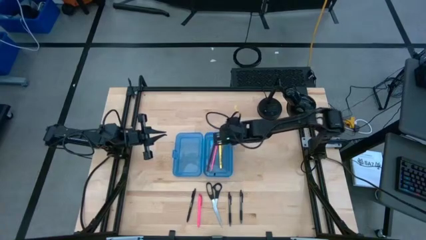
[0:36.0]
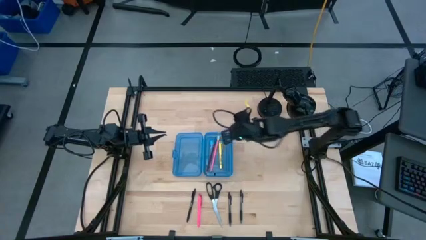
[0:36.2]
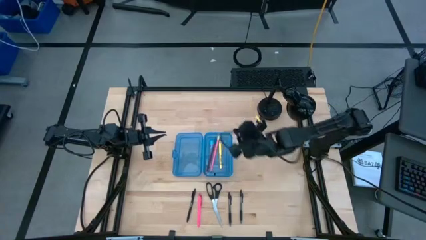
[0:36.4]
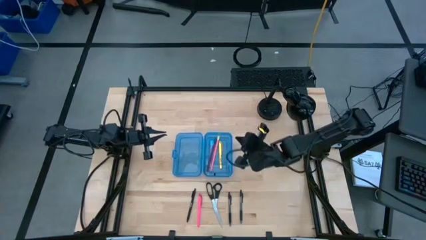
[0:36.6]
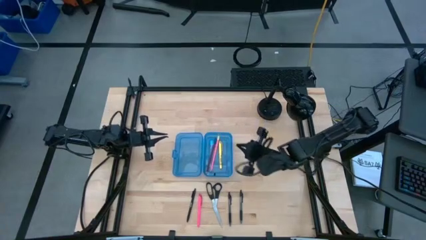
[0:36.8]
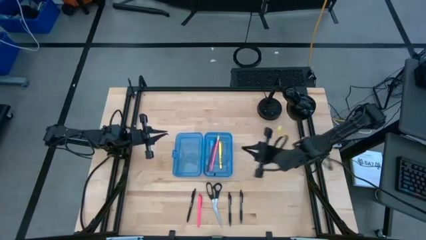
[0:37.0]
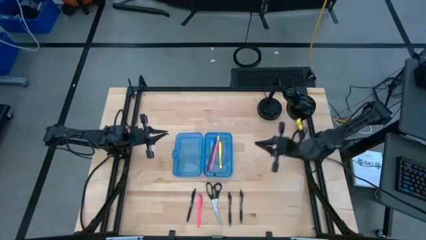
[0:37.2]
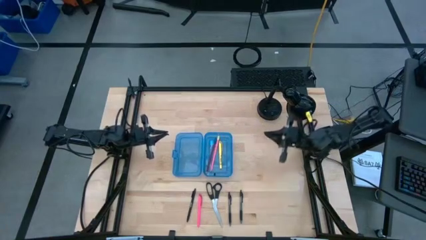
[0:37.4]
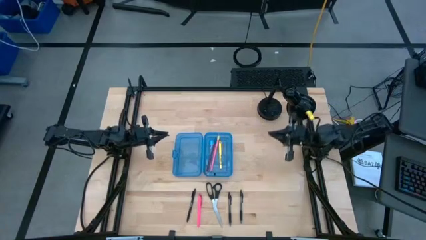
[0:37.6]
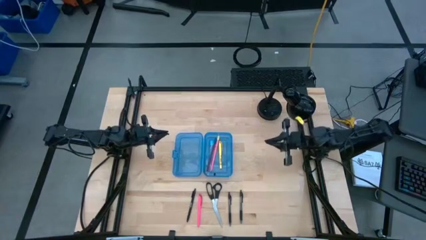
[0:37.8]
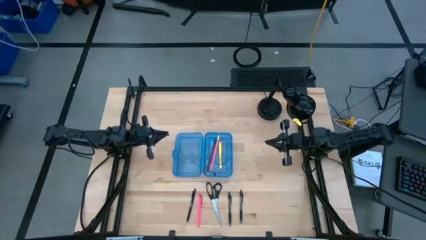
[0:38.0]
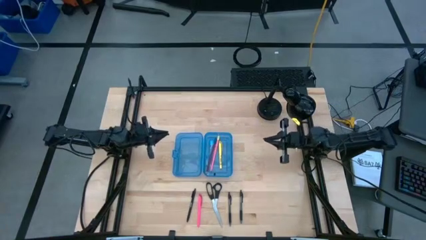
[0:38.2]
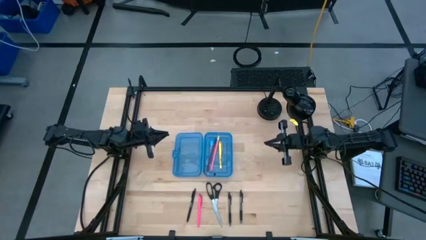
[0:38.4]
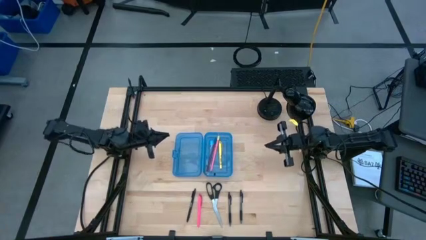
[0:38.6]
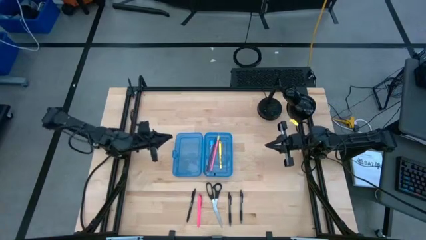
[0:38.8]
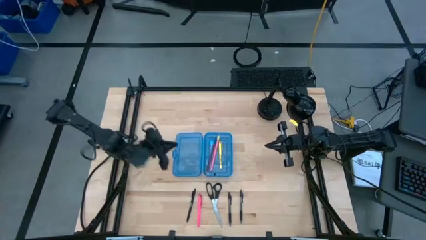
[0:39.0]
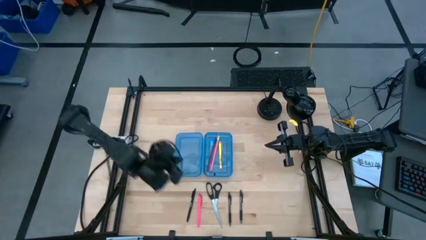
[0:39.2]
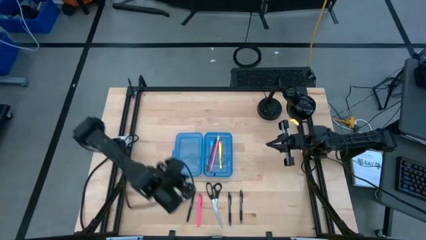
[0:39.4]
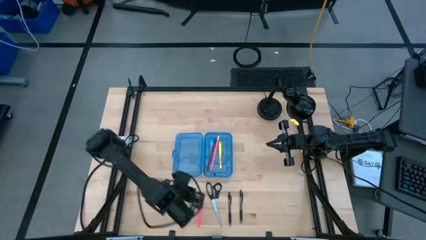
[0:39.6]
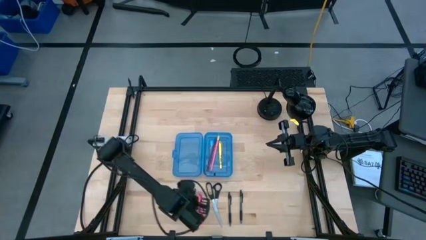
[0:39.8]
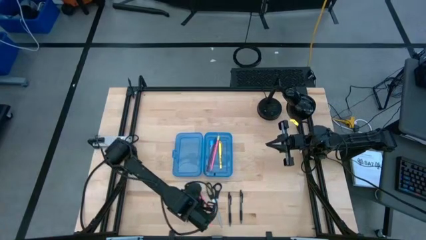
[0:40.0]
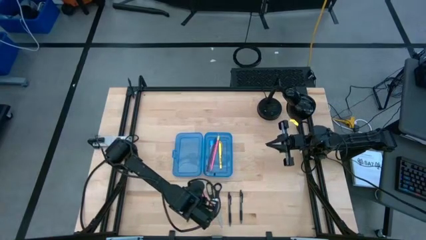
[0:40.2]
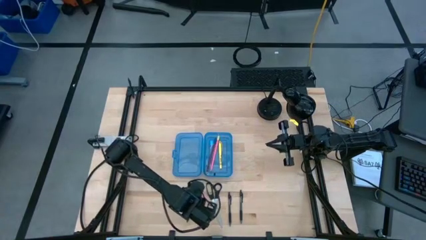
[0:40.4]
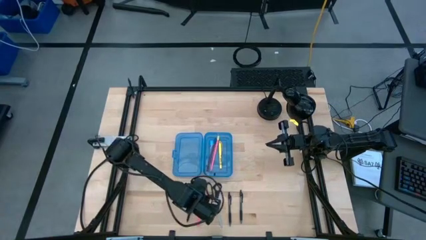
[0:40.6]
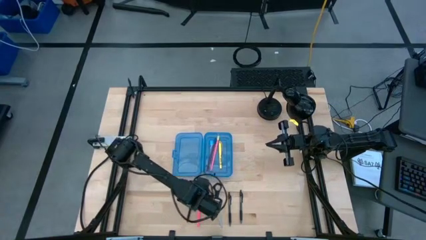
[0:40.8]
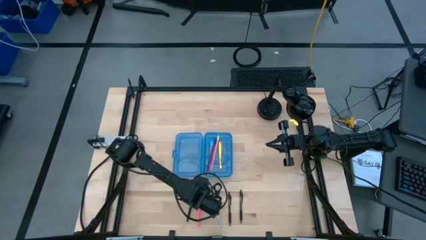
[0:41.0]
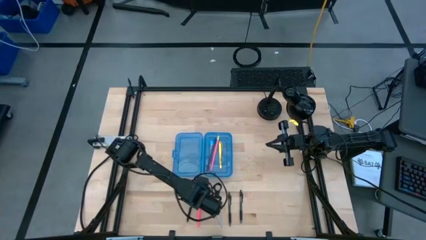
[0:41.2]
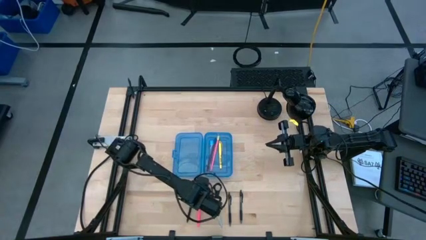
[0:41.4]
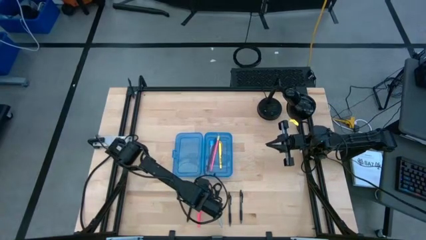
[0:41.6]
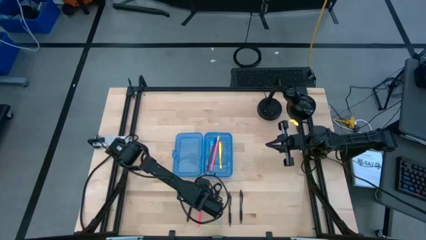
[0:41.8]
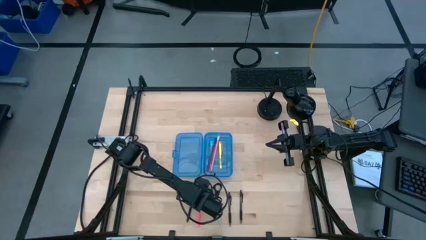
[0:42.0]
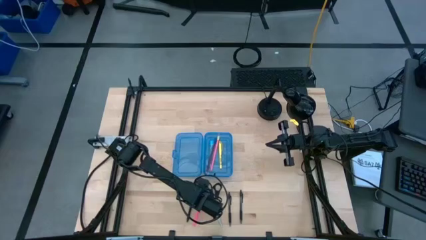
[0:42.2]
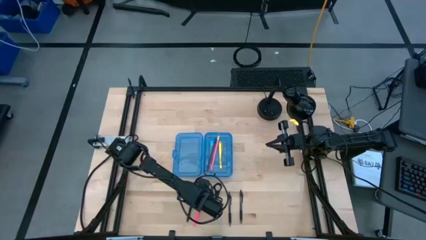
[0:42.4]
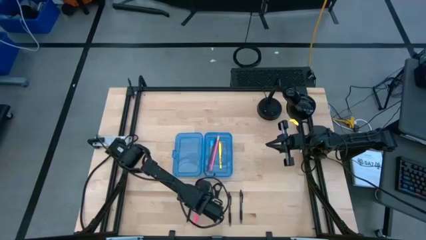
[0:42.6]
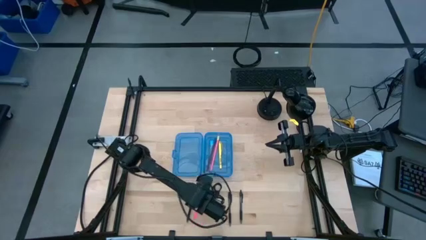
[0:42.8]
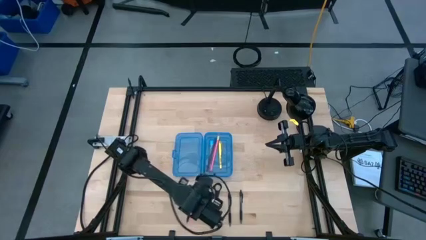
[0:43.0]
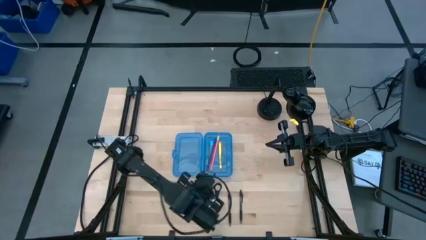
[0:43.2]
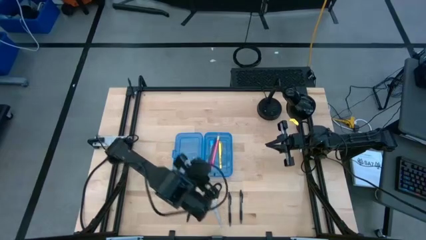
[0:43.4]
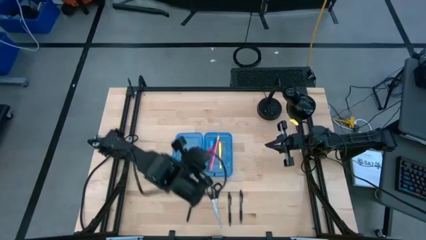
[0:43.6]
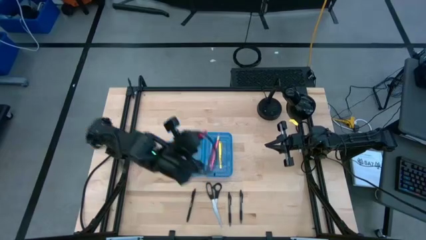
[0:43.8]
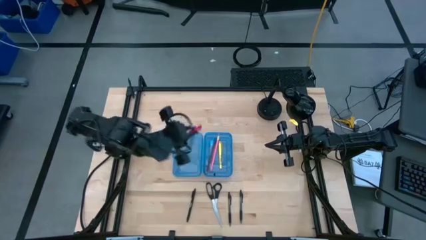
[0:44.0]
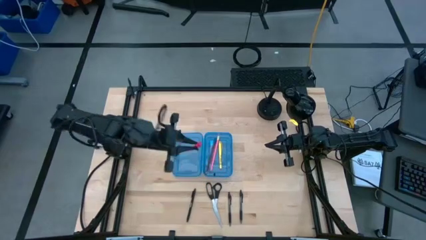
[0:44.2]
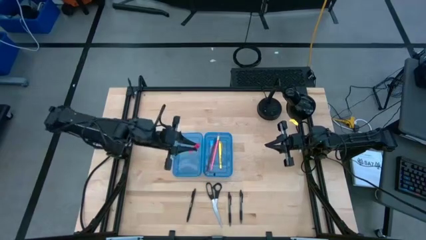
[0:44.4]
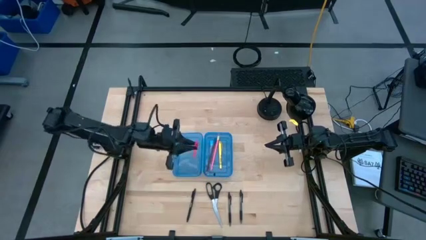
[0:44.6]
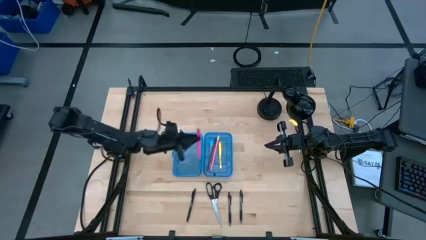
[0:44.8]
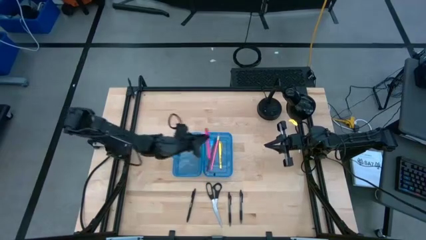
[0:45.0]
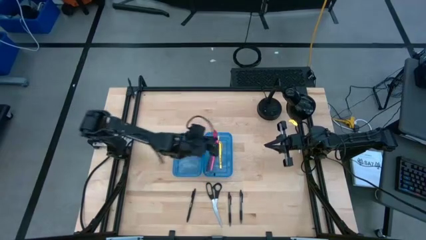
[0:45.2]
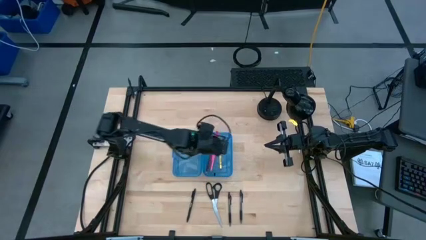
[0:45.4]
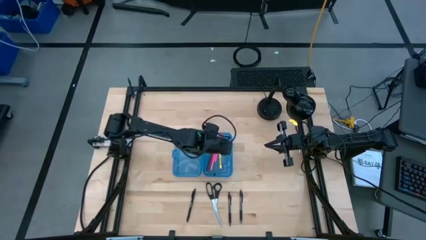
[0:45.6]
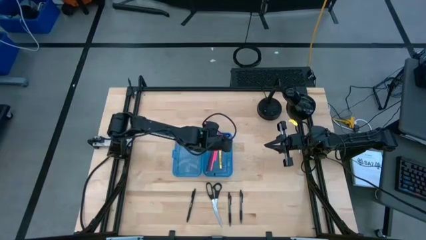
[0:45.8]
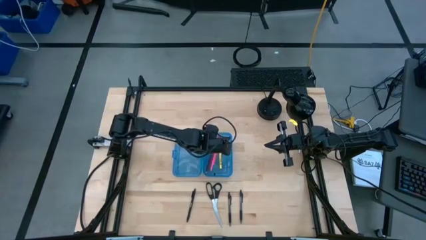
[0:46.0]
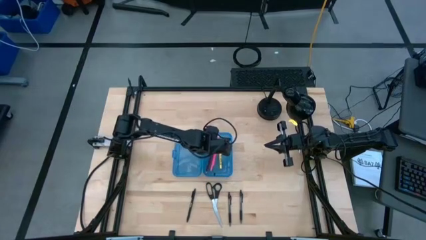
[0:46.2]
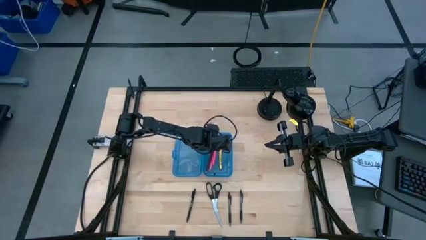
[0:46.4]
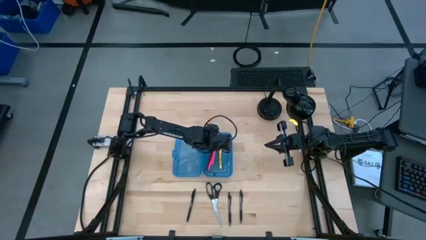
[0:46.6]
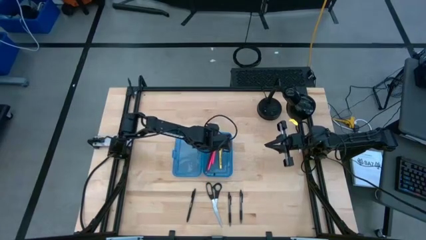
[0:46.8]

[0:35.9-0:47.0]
Task: Pick & place school supplies into a supply box
Put the pink pen into the blue pencil box

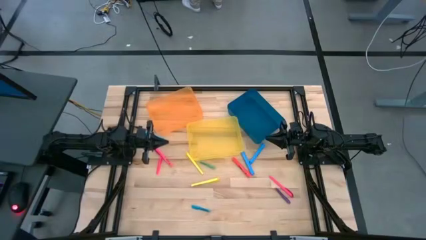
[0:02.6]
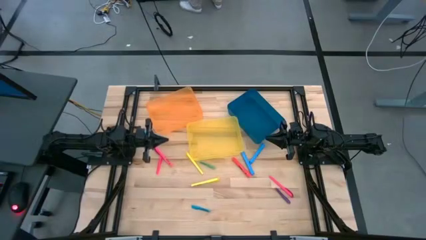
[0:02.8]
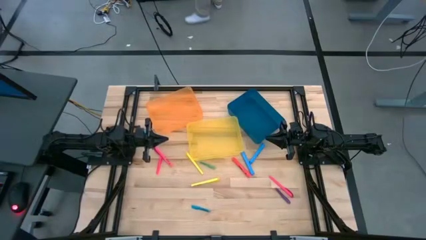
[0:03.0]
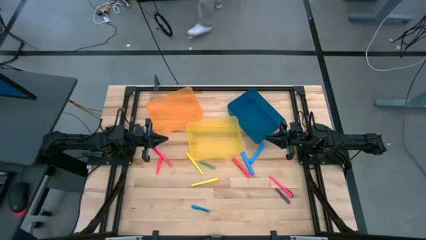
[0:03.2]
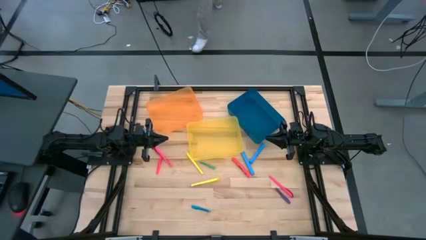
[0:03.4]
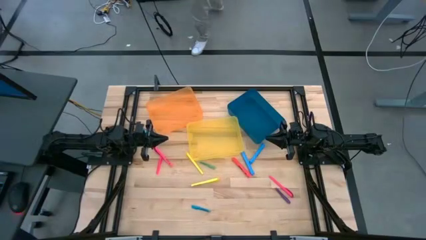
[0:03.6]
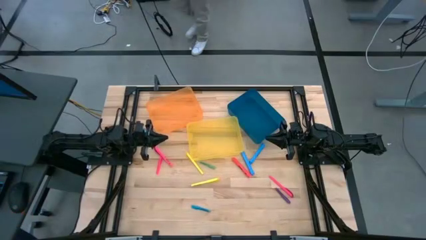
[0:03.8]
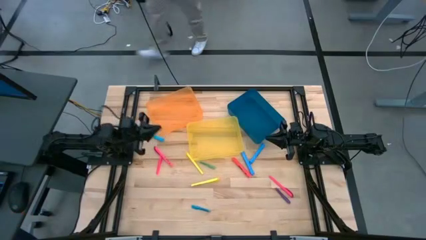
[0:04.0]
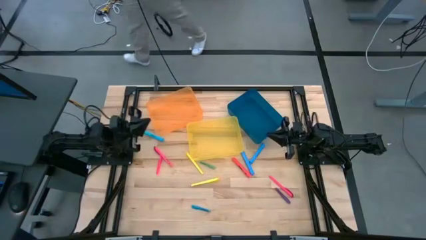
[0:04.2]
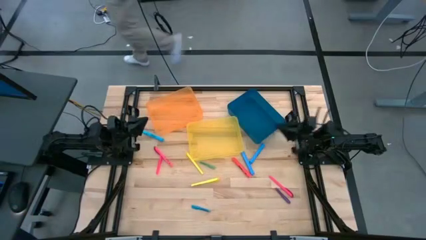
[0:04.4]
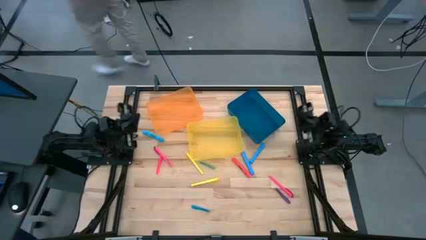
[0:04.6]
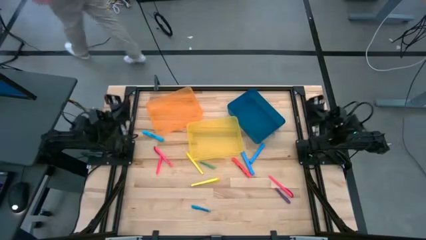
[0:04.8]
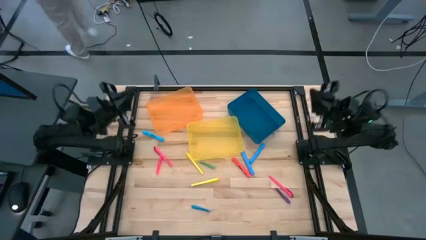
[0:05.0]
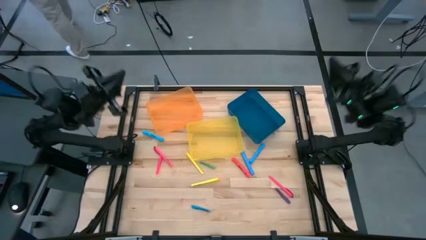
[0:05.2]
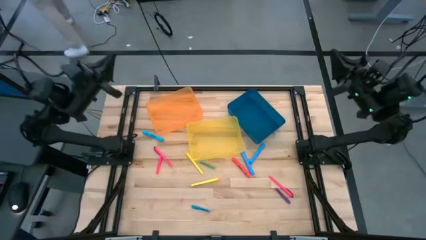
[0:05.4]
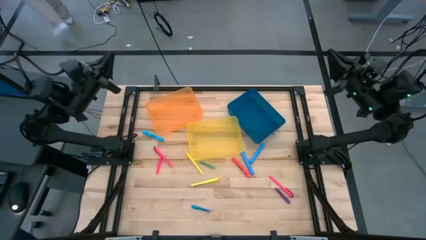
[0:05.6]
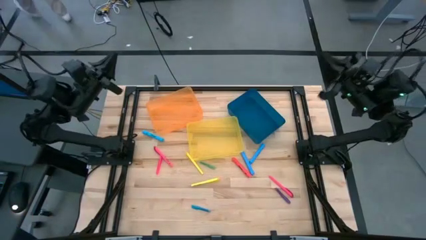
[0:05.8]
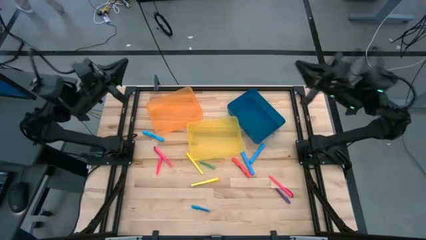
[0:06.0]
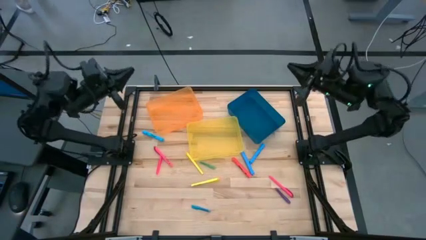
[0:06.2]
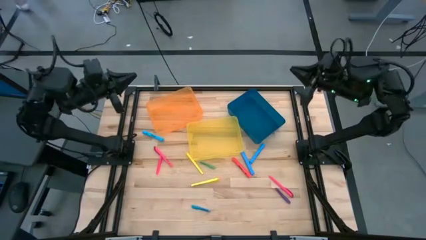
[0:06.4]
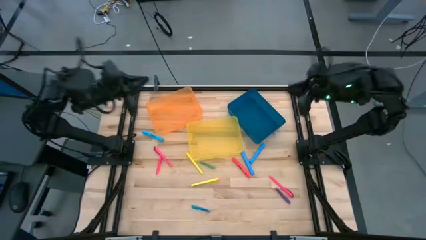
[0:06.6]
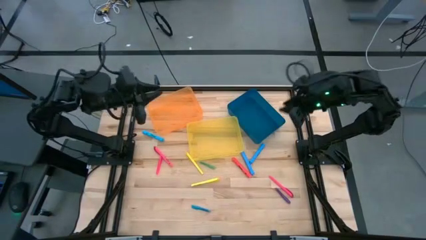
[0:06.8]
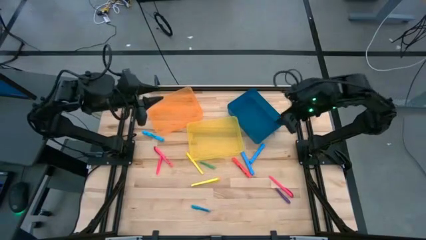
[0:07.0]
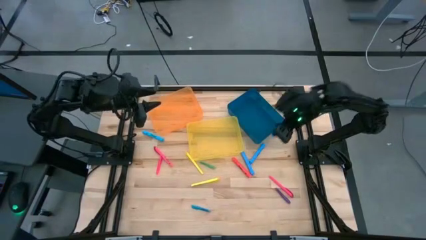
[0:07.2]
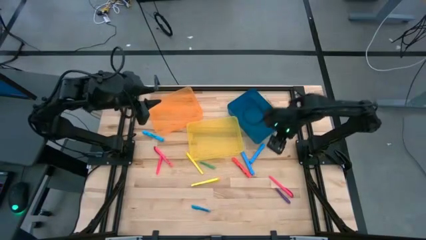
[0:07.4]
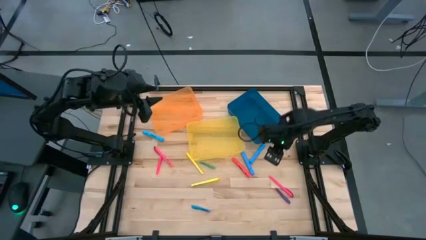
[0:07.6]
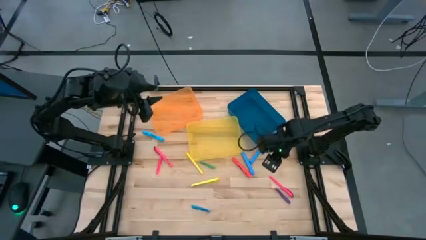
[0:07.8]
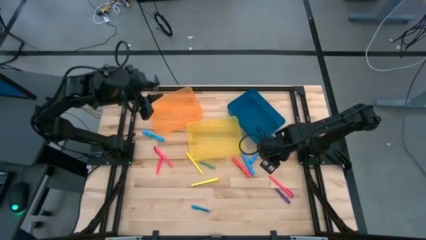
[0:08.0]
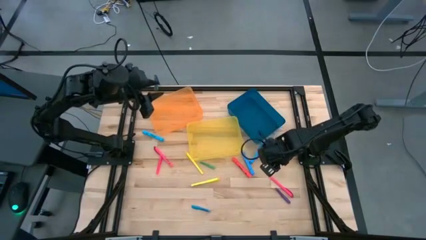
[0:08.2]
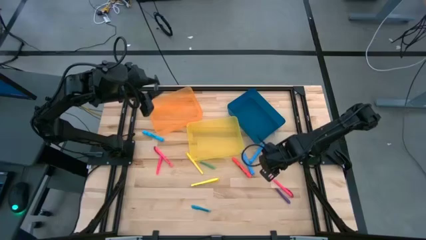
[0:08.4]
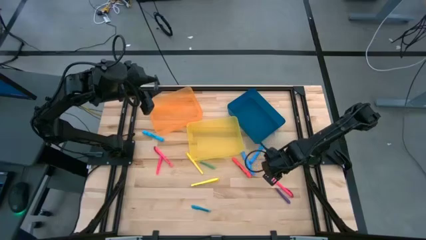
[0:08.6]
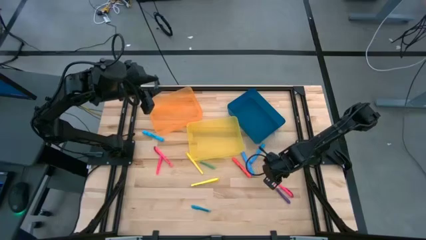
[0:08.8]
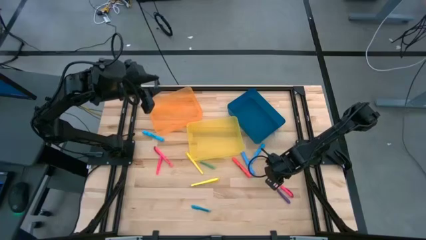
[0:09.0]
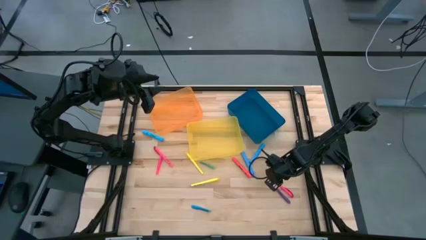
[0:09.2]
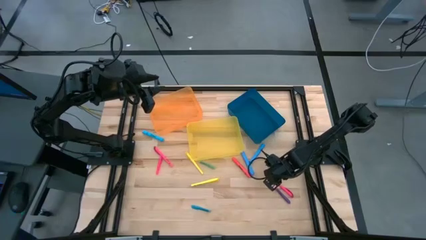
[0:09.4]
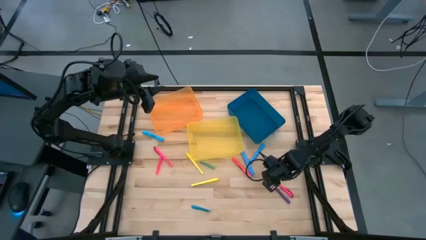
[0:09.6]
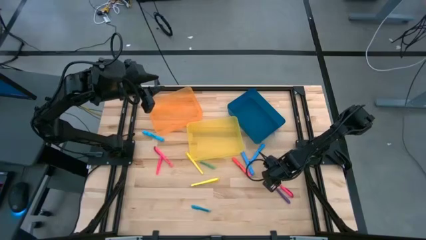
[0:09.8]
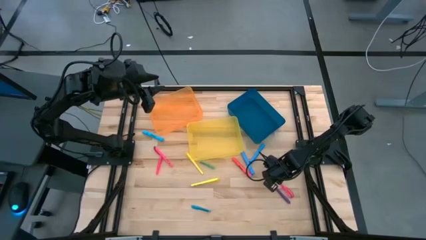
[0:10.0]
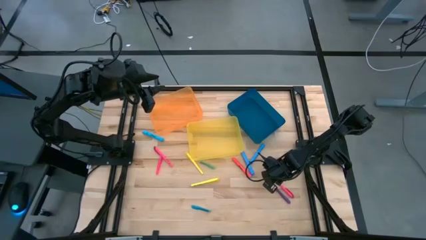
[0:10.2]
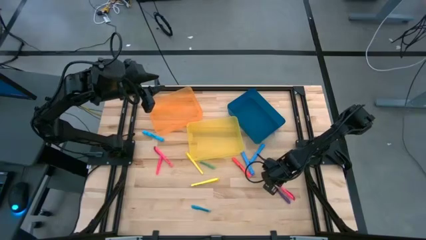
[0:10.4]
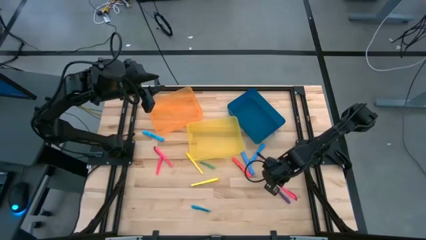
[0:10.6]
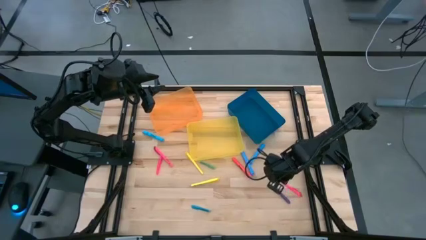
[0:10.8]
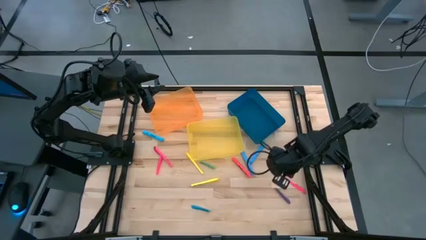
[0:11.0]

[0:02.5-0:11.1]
Task: Pick & Place Markers
Put the bottom medium pink highlighter pen into the yellow bin
